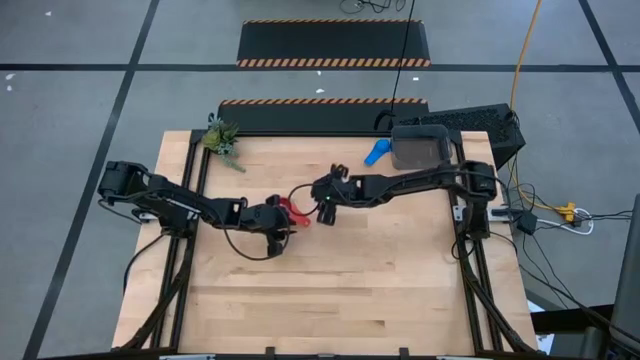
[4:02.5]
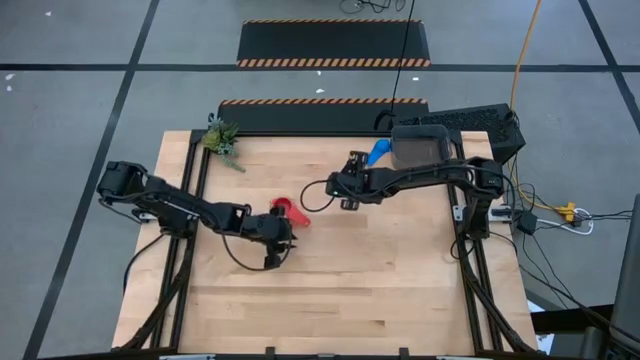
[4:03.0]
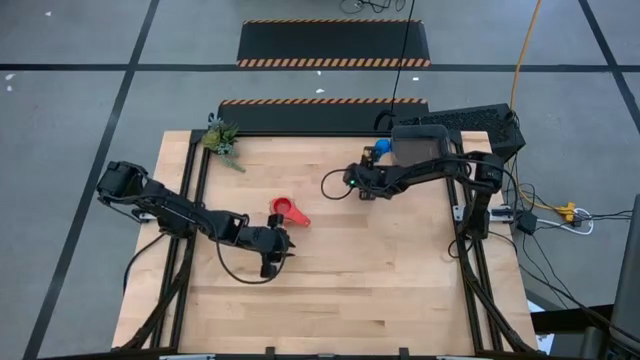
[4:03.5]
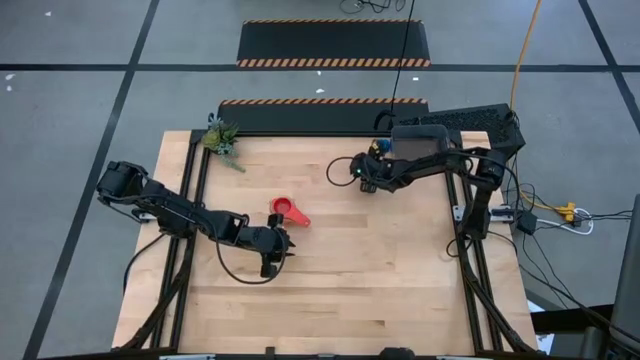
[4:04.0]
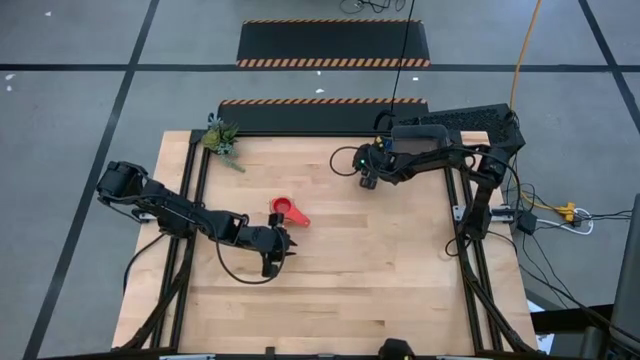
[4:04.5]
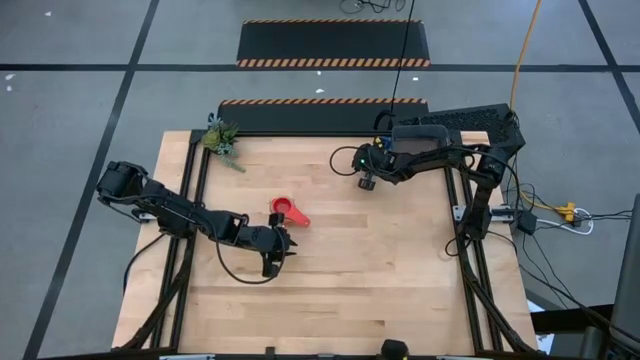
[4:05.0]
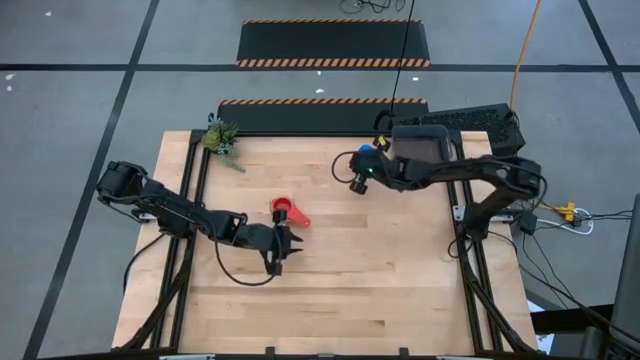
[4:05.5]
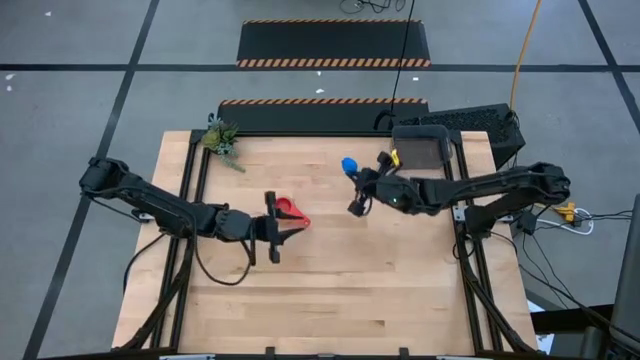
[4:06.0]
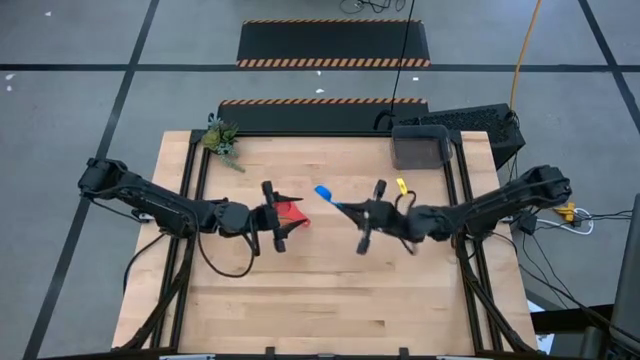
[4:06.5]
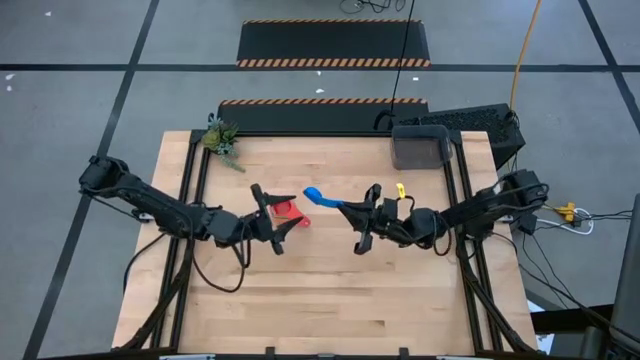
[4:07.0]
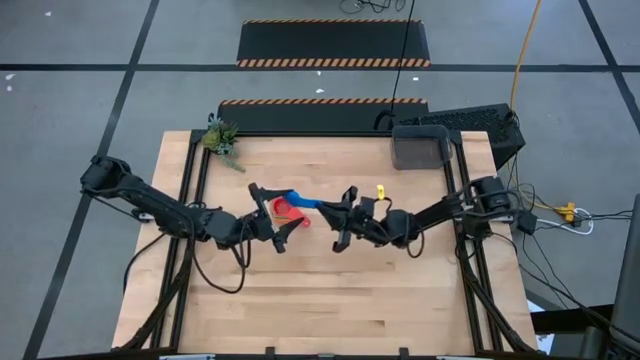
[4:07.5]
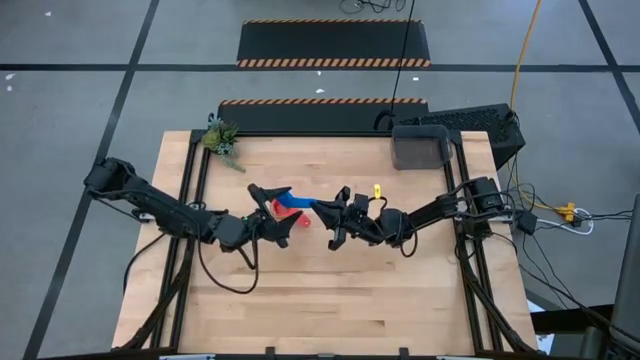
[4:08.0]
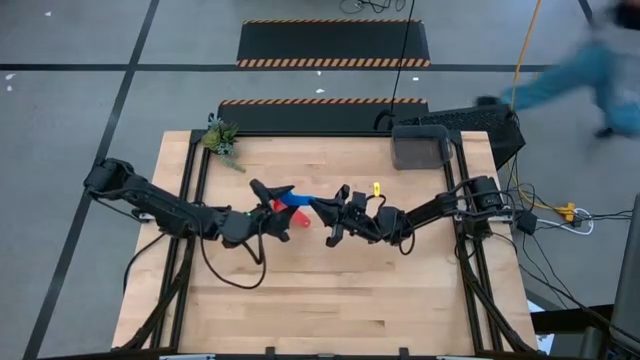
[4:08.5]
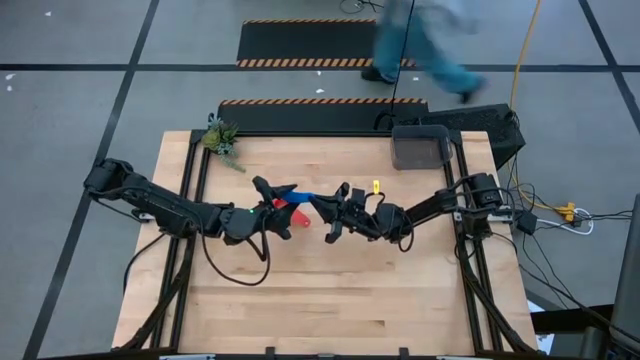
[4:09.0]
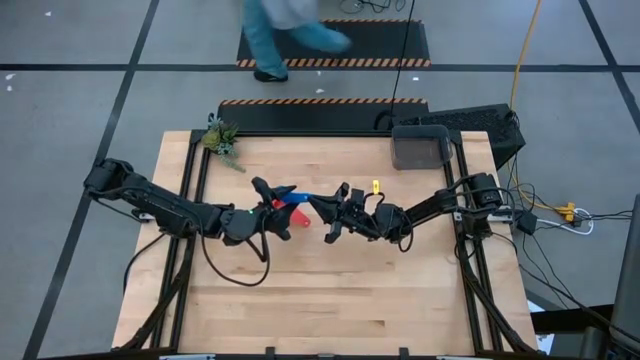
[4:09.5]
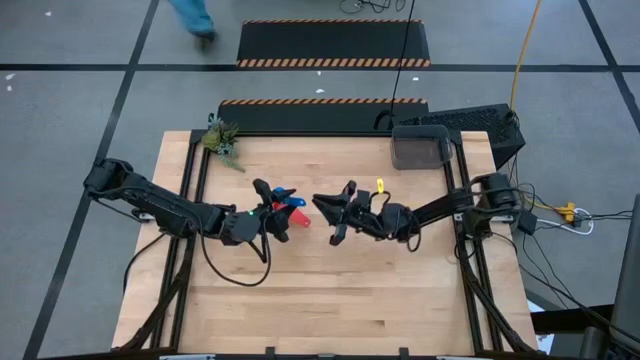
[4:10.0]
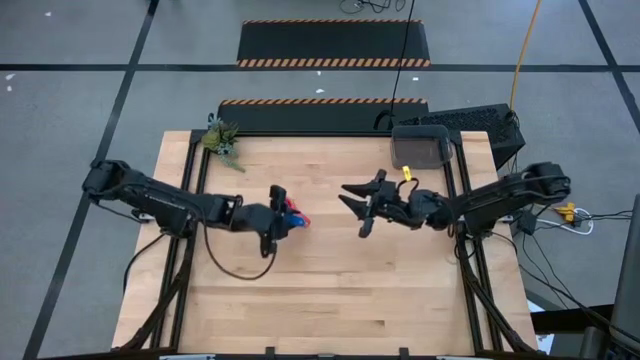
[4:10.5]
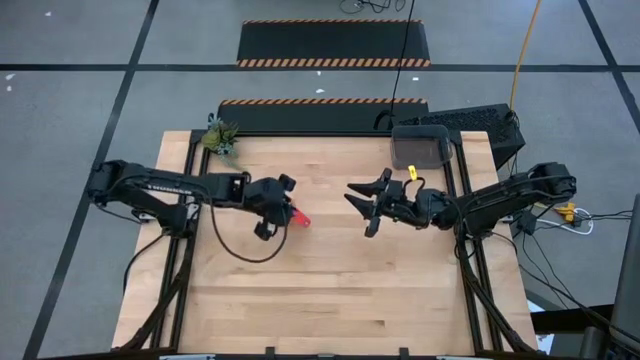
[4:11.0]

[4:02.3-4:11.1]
Task: Nest measuring cups in basket
Stack the blue measuring cup on top of the light red measuring cup

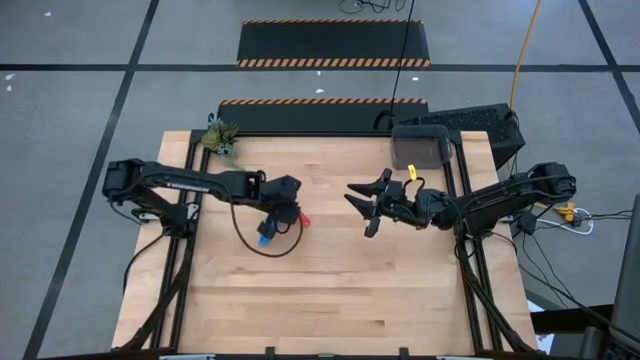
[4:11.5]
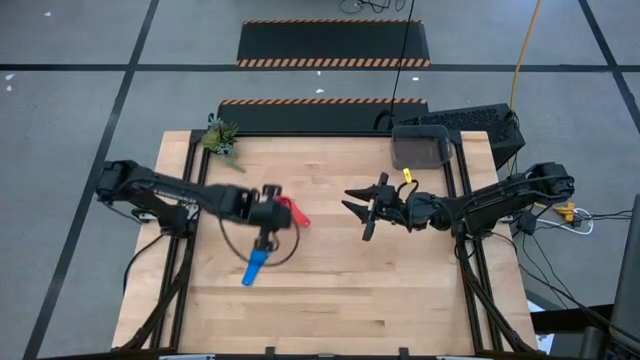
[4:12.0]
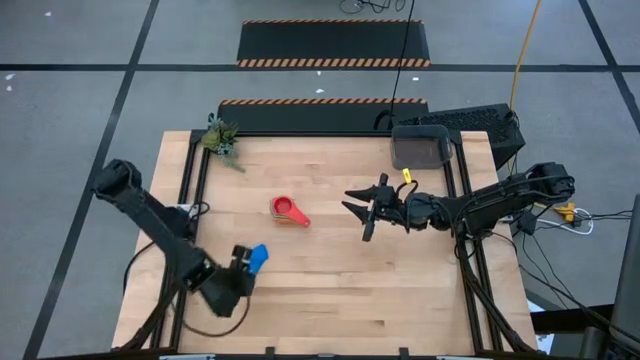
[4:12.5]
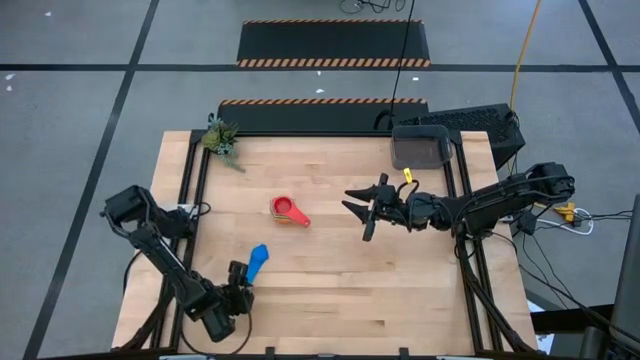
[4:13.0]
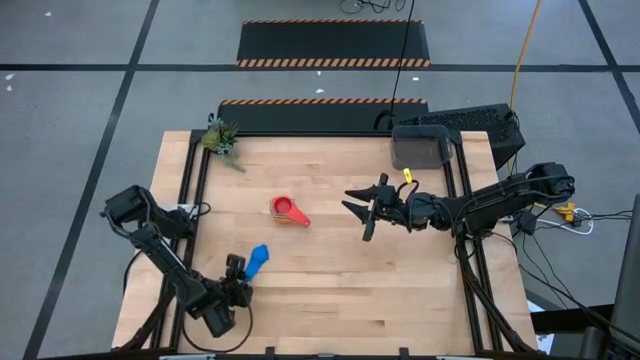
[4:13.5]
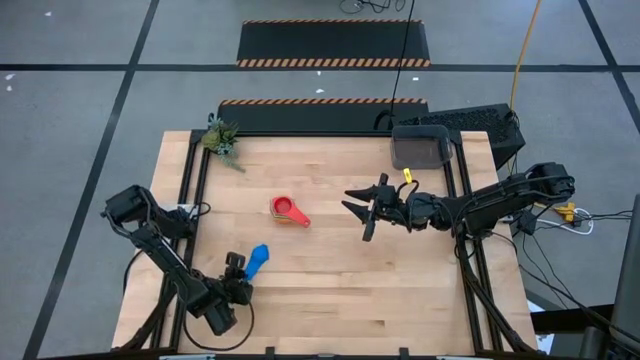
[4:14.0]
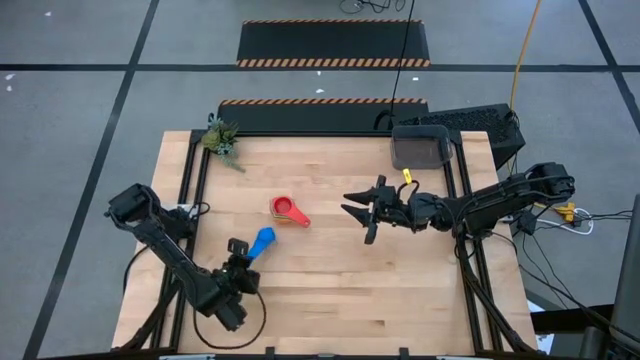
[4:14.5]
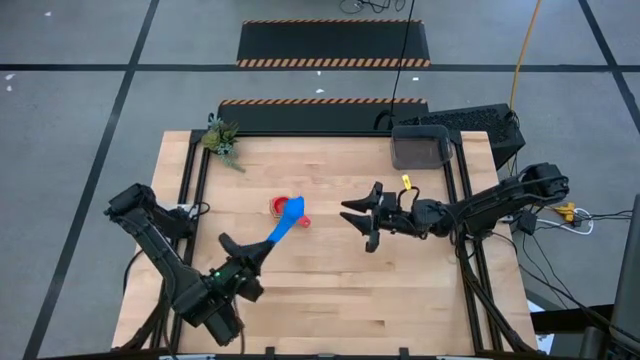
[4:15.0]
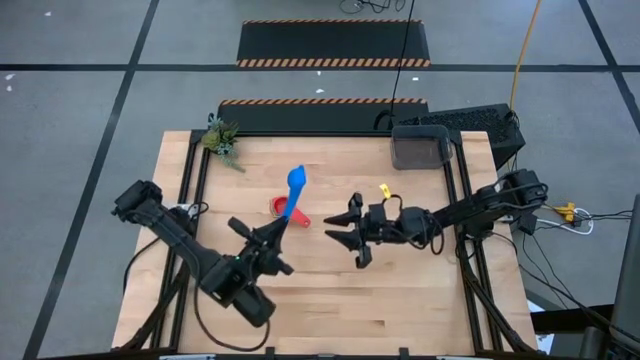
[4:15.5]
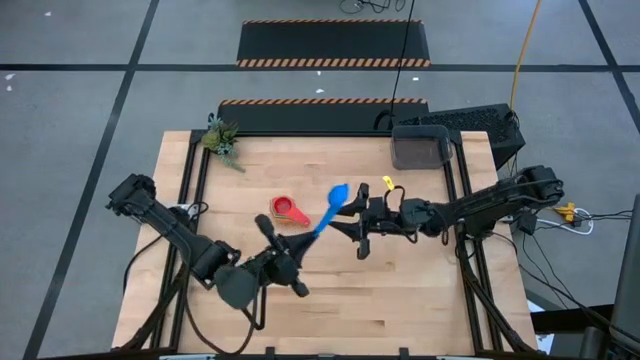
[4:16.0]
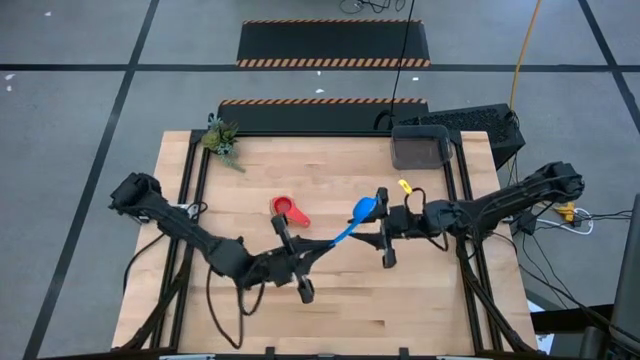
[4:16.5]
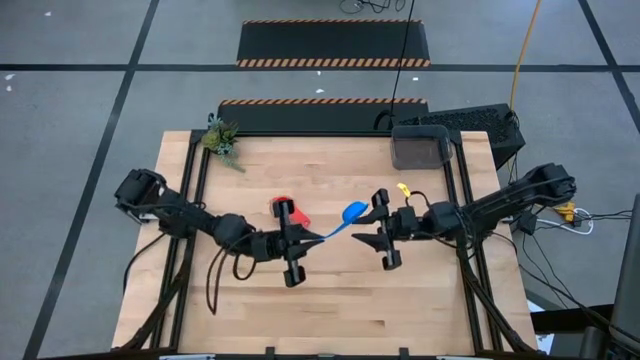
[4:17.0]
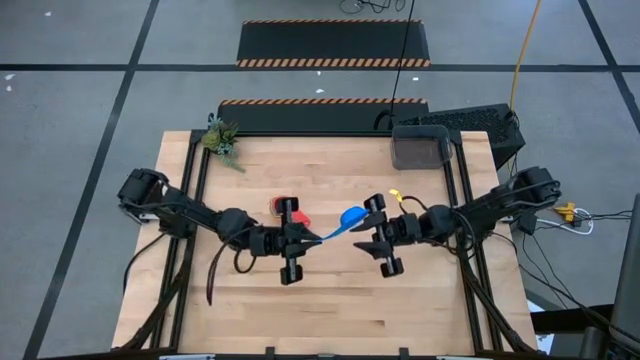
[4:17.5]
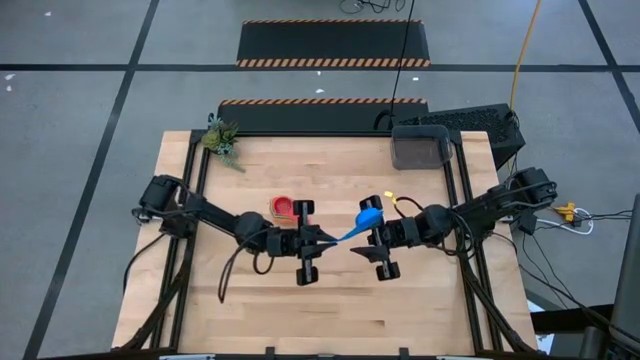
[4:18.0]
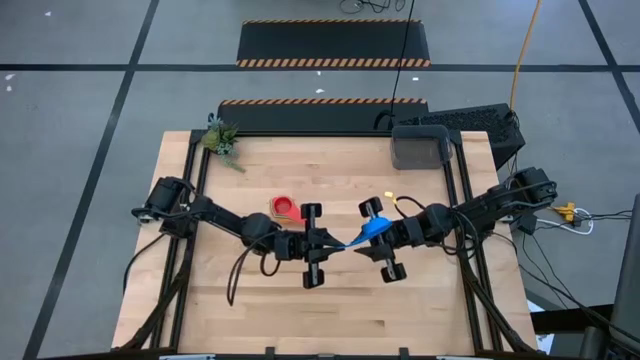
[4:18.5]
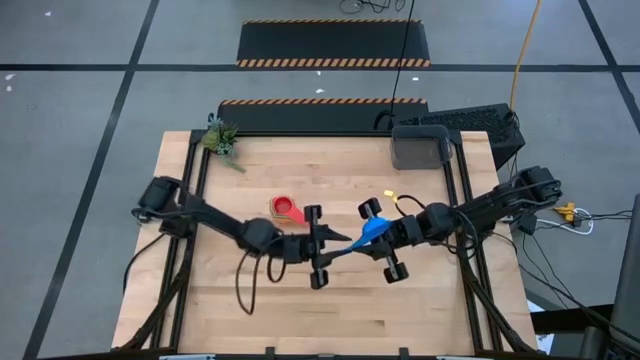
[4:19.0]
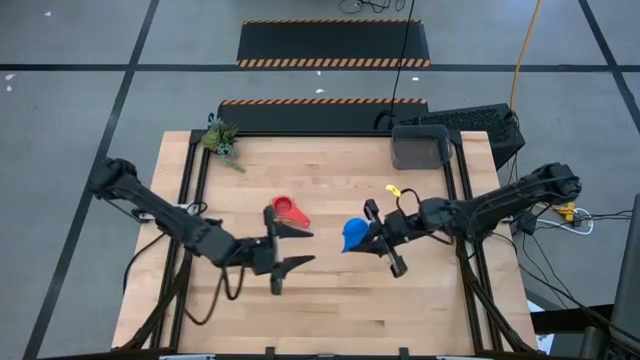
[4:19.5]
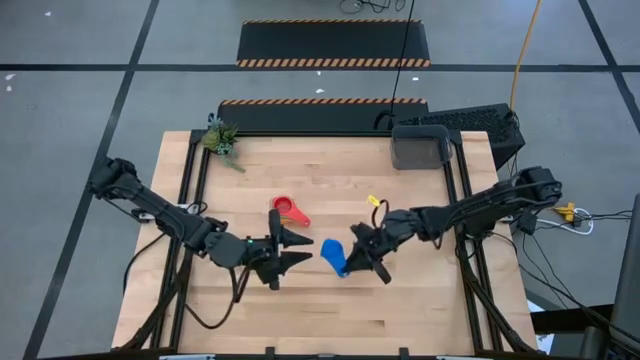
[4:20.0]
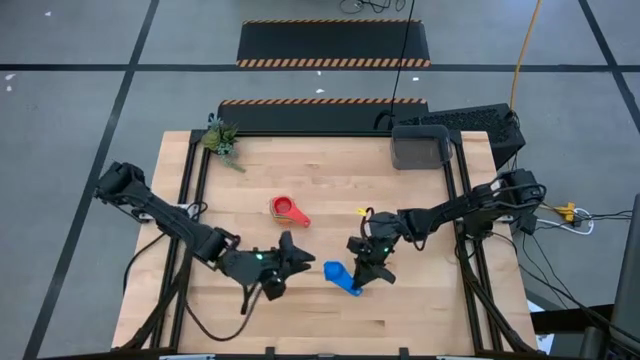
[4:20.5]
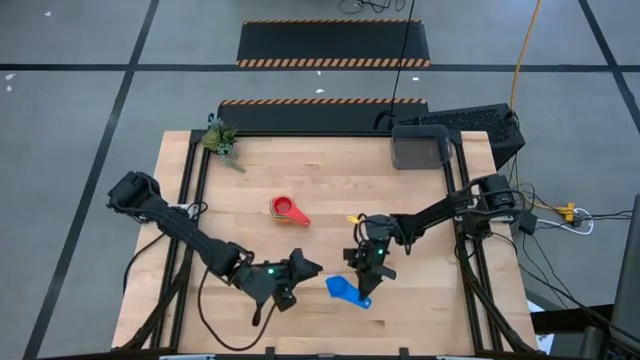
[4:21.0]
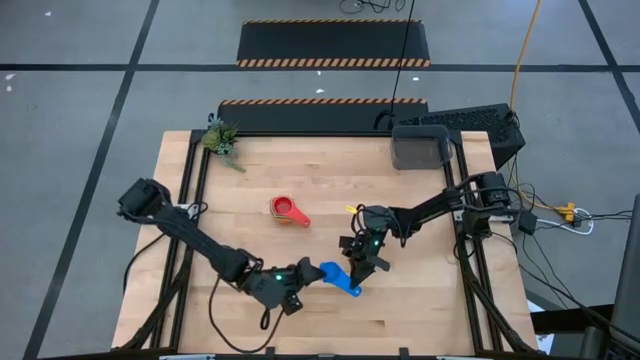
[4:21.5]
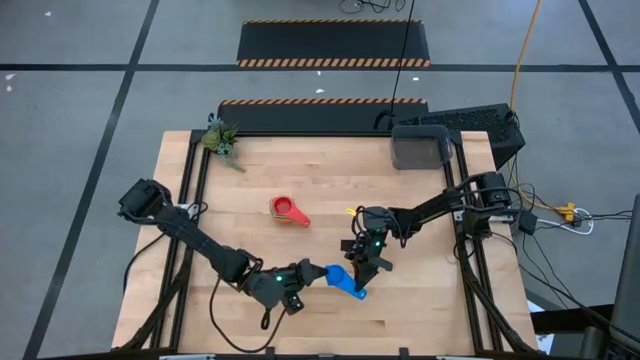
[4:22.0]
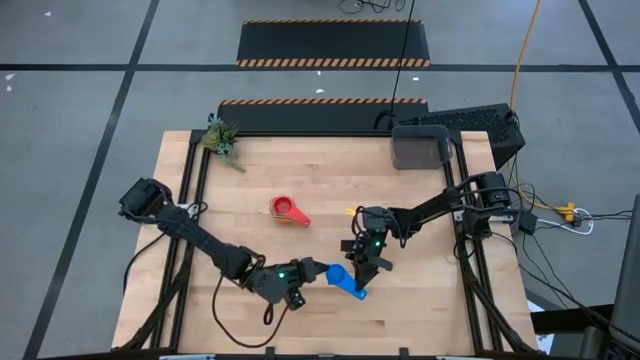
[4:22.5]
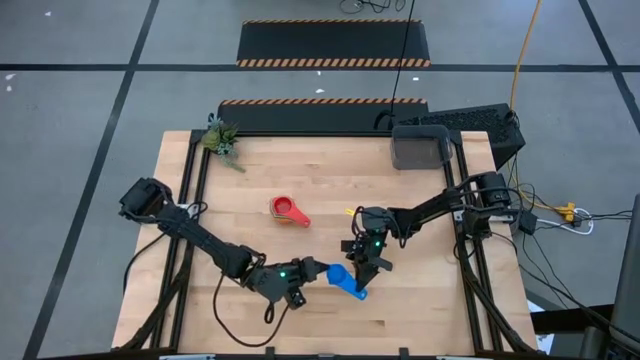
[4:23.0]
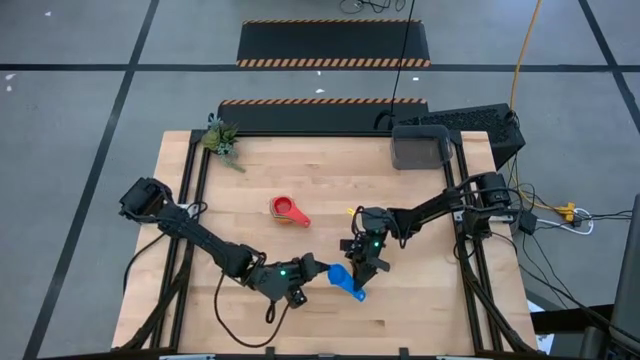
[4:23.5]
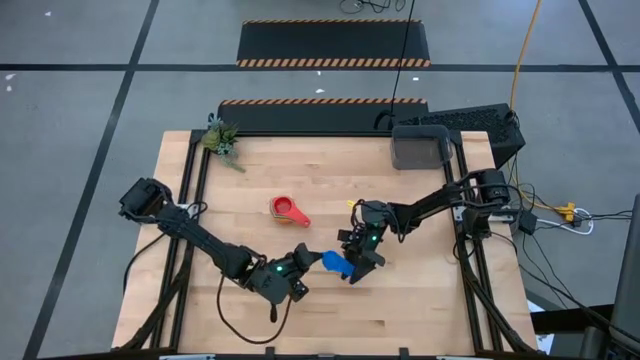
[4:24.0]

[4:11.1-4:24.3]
Stack the blue measuring cup on top of the light red measuring cup
